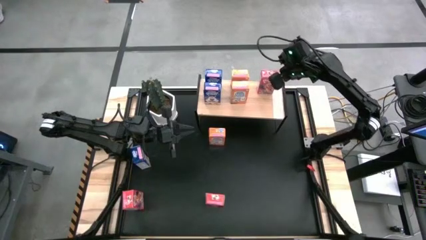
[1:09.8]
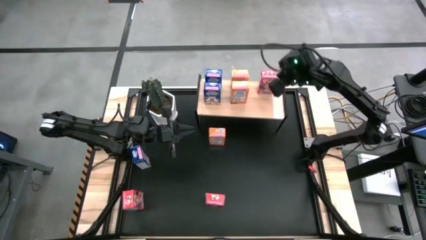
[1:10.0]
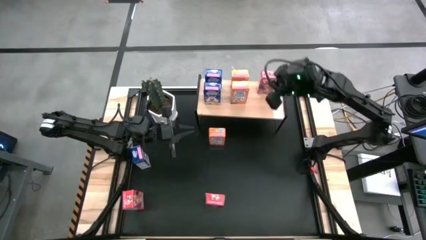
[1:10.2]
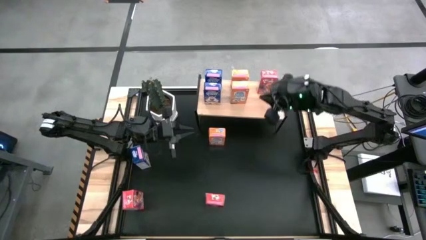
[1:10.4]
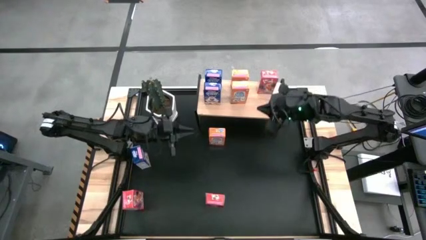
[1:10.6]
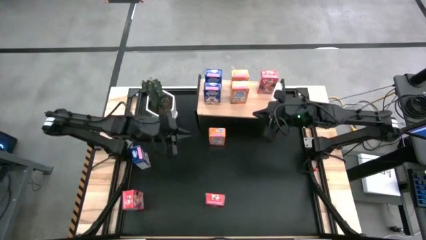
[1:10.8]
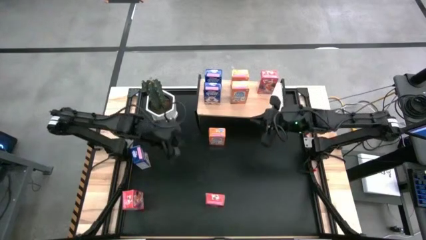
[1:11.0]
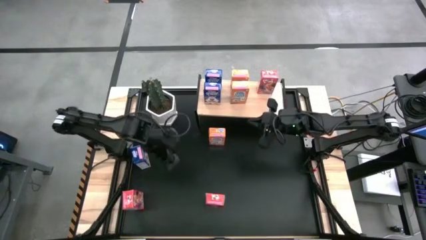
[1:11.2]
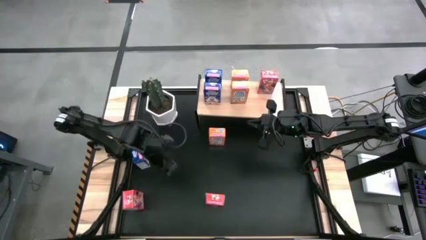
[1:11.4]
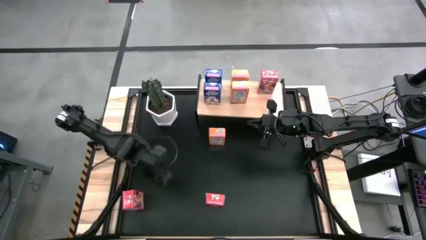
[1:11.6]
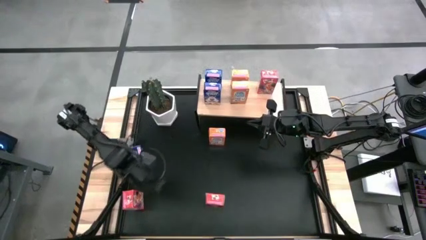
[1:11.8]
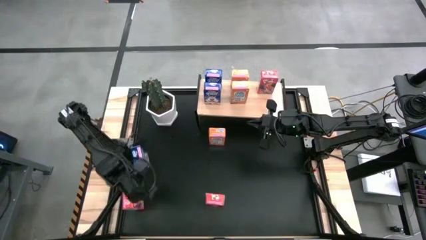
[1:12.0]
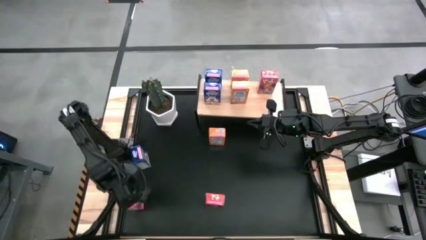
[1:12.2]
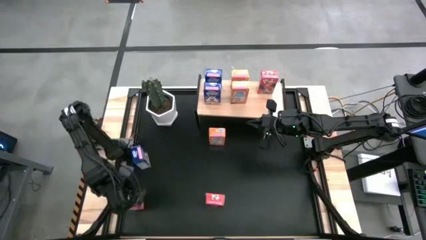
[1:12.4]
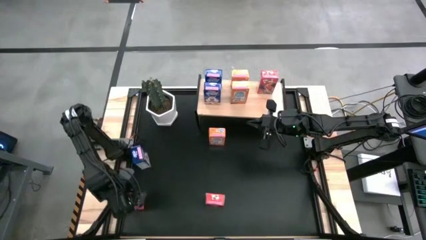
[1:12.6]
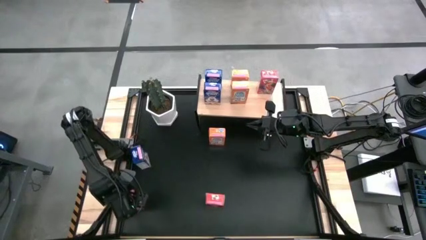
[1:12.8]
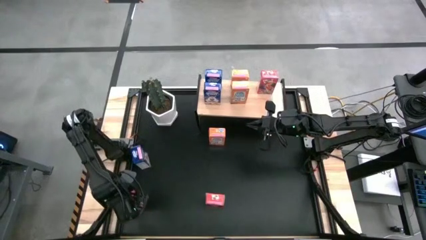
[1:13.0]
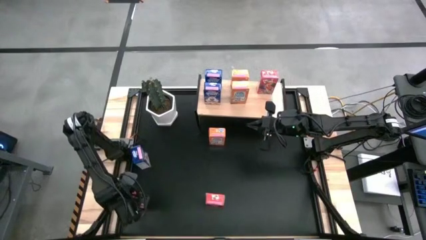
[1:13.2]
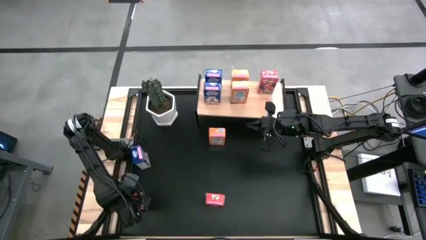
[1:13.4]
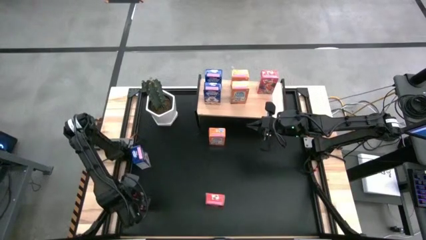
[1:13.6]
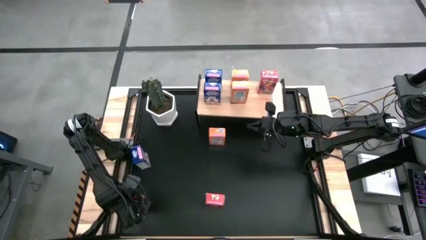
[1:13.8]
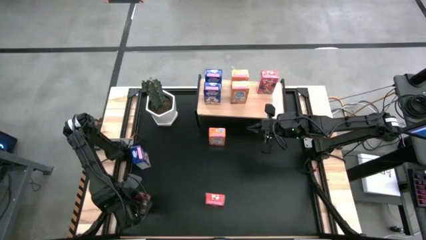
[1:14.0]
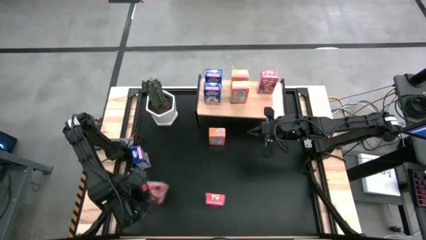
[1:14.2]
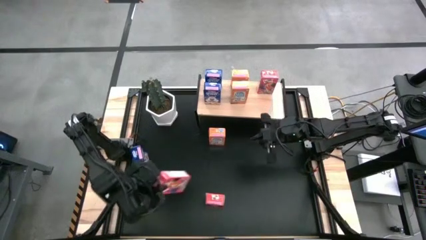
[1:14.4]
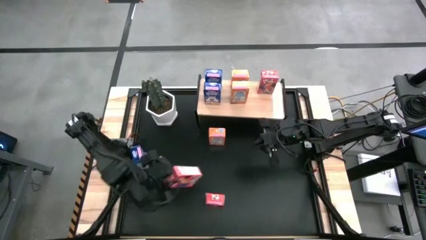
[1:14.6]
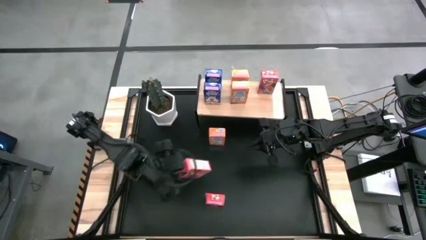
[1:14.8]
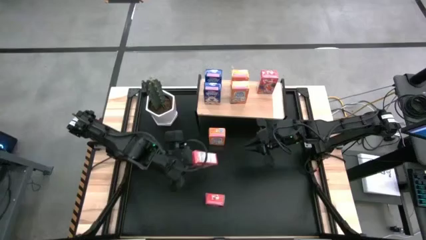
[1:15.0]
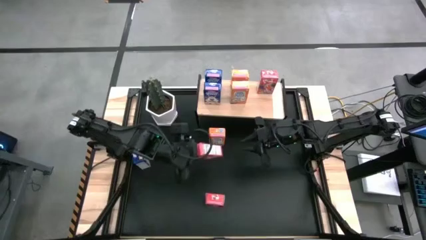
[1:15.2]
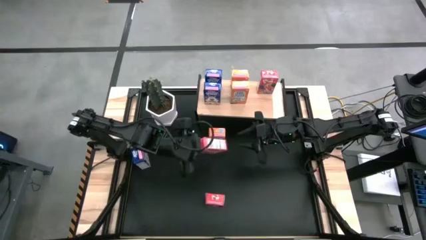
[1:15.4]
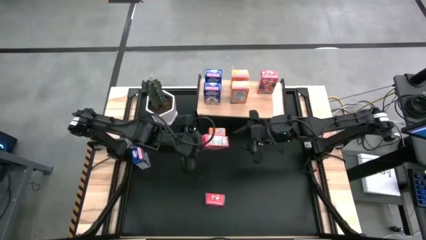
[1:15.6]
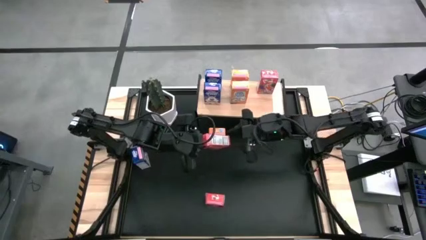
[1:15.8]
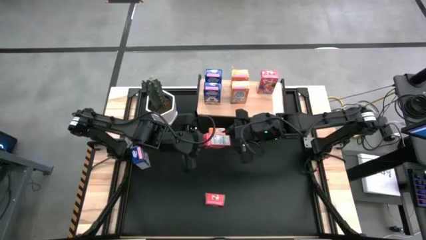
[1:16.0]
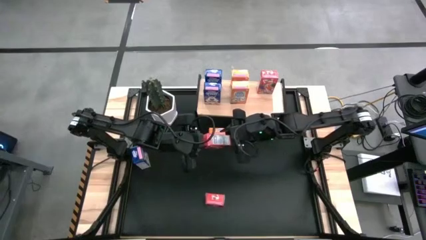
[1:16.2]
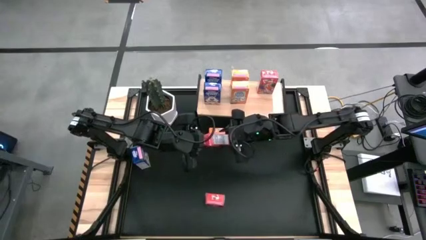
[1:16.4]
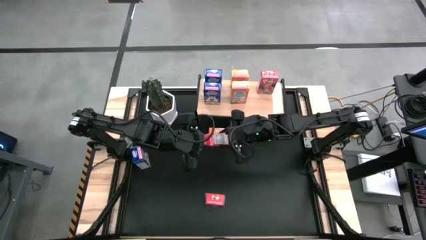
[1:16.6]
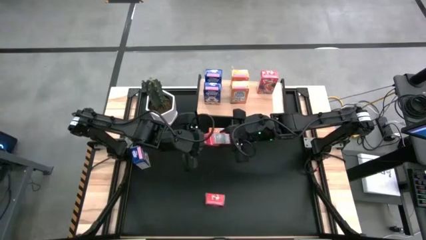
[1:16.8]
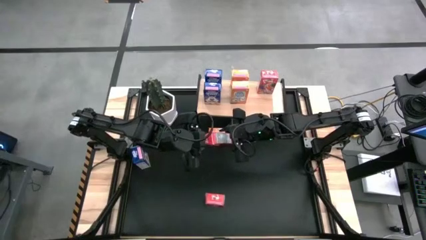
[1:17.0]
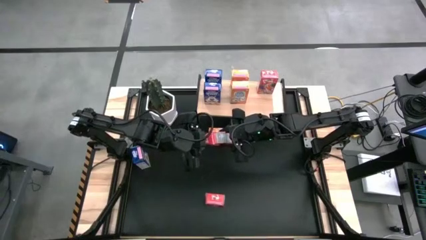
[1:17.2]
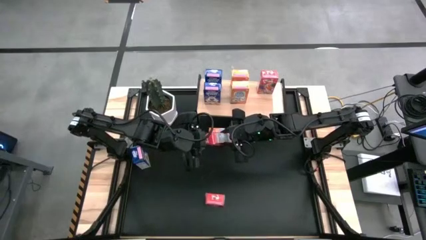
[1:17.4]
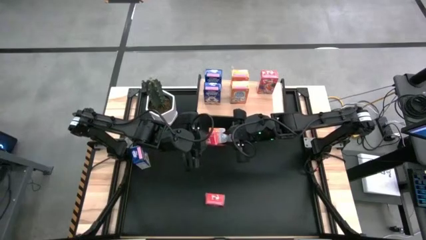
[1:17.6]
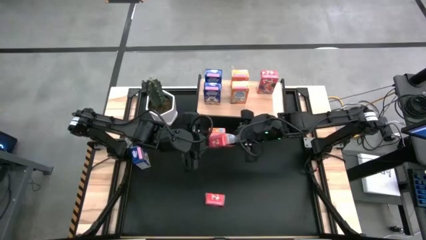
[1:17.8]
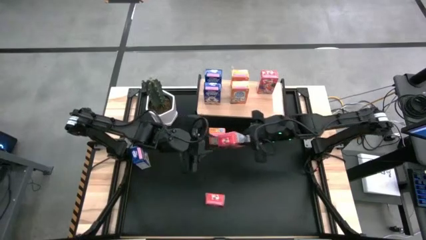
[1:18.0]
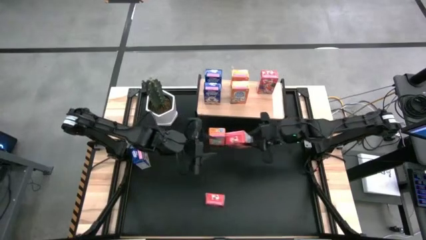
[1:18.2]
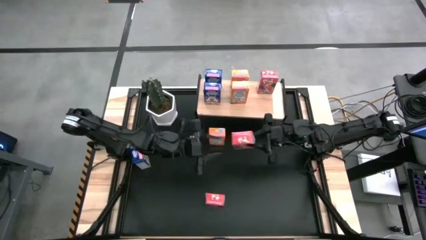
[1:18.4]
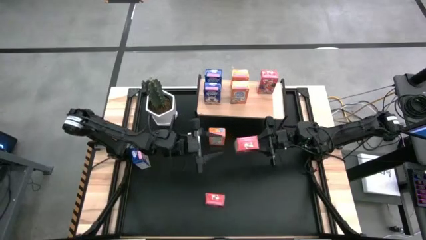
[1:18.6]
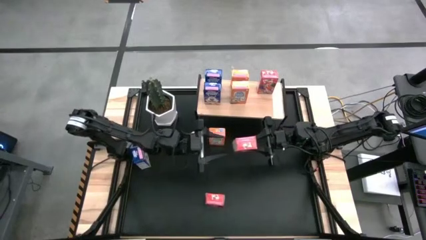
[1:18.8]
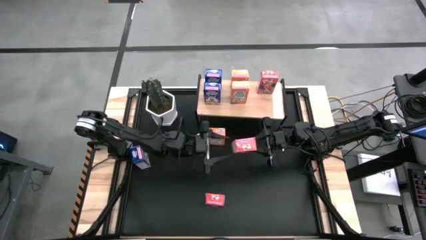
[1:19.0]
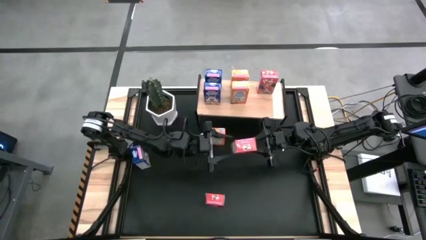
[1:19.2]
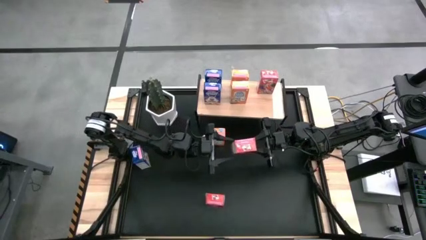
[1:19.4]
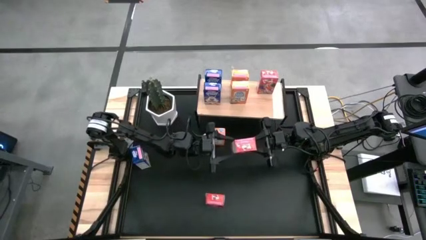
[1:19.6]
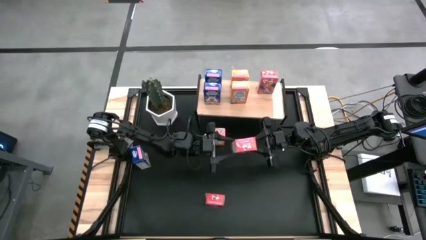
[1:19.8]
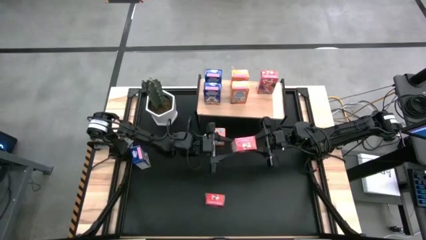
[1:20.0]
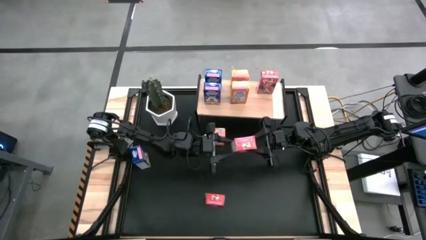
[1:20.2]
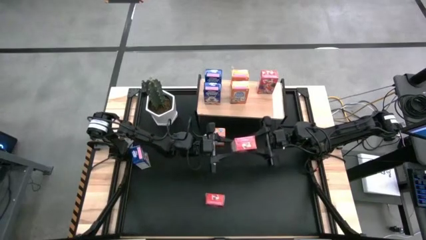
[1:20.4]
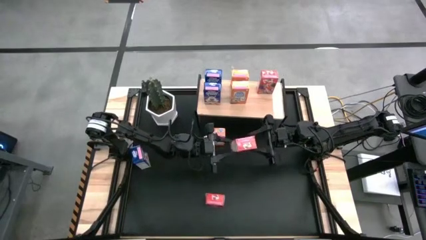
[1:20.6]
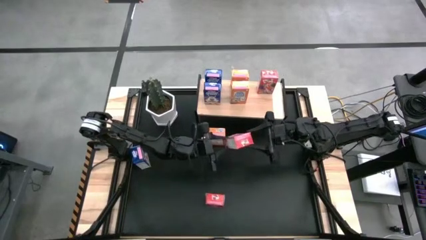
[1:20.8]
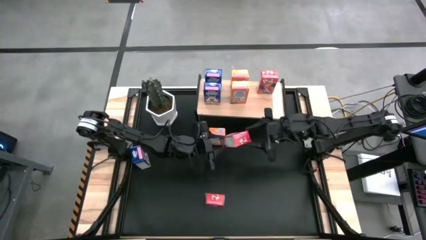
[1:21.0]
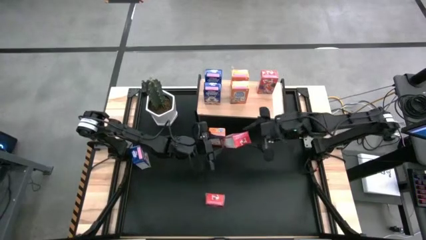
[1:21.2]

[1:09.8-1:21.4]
Task: Stack cereal on shelf
Put the left red cereal box on the shelf

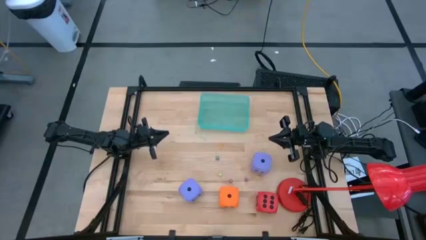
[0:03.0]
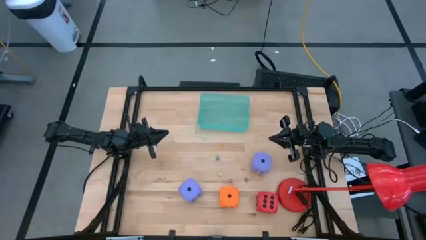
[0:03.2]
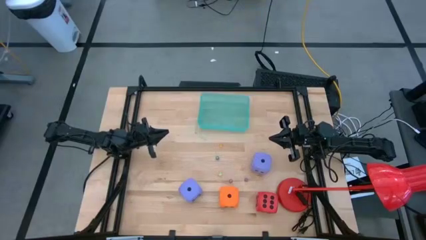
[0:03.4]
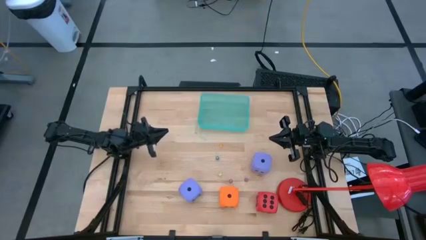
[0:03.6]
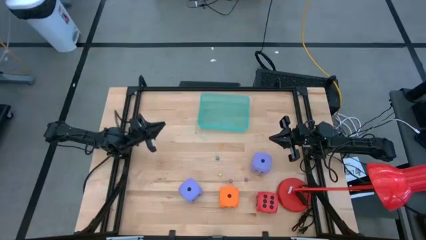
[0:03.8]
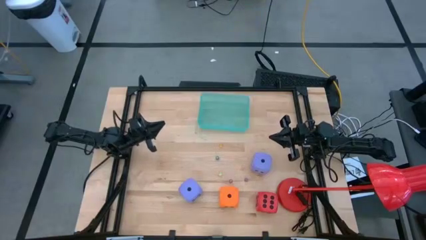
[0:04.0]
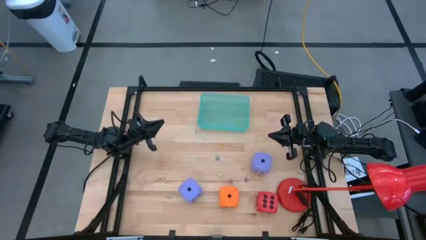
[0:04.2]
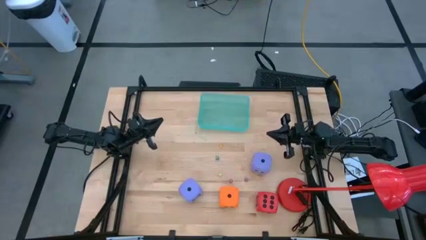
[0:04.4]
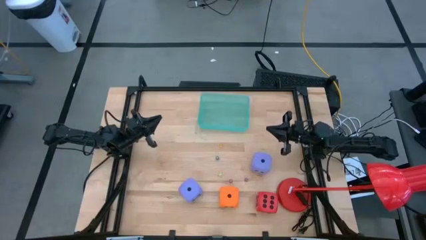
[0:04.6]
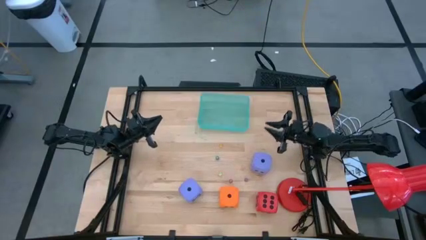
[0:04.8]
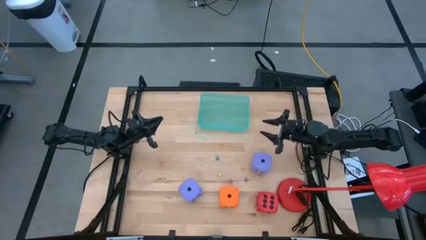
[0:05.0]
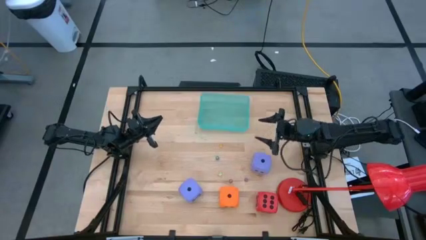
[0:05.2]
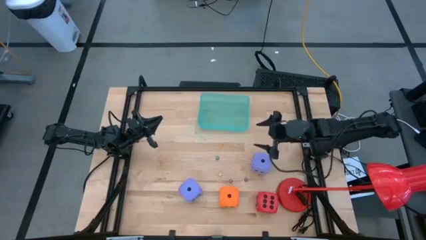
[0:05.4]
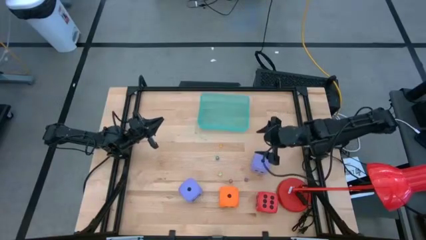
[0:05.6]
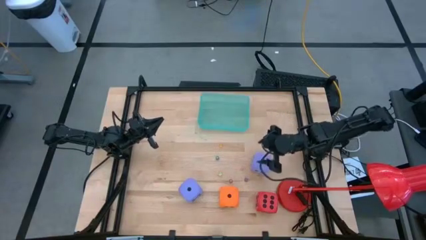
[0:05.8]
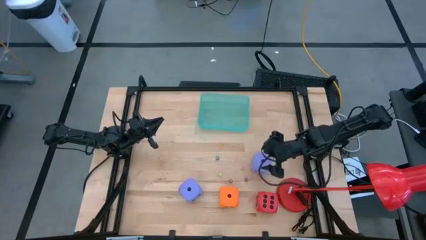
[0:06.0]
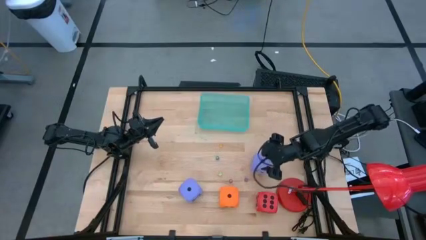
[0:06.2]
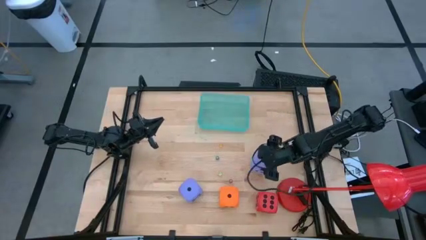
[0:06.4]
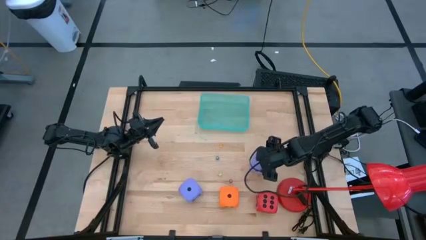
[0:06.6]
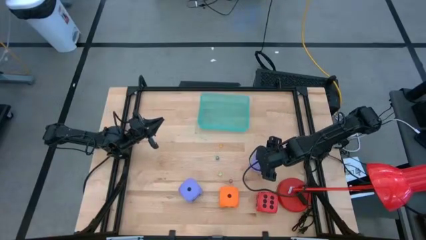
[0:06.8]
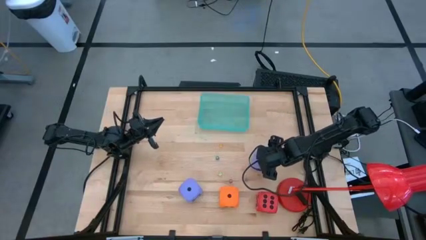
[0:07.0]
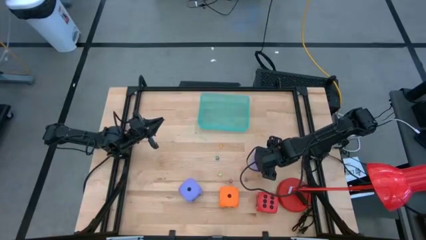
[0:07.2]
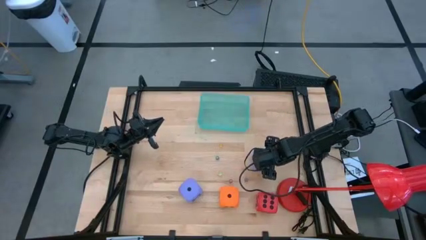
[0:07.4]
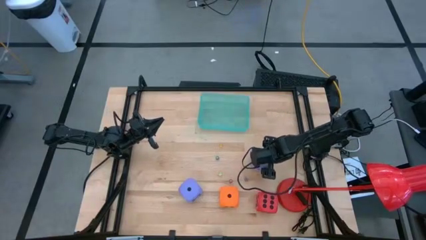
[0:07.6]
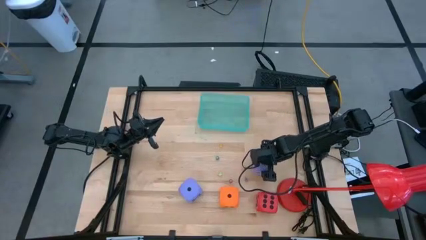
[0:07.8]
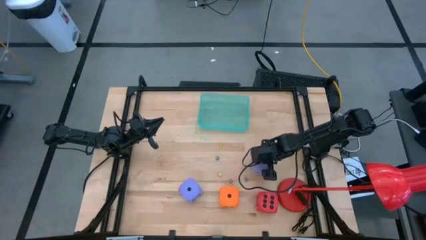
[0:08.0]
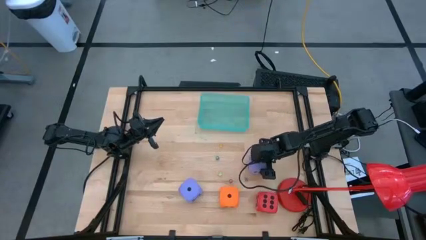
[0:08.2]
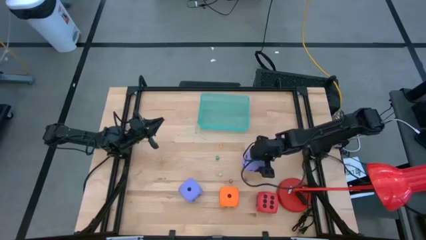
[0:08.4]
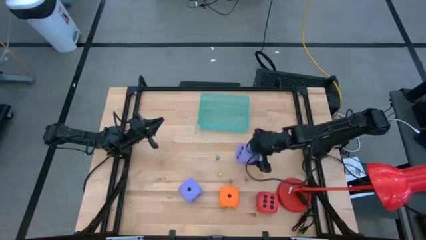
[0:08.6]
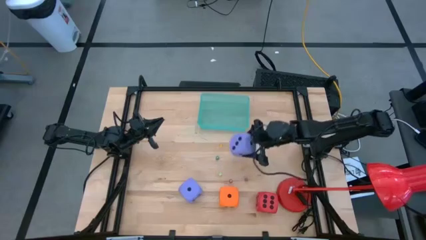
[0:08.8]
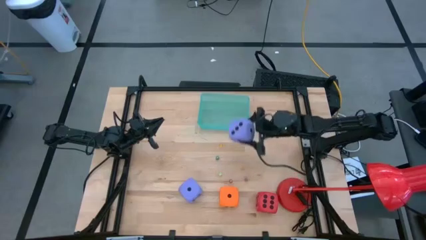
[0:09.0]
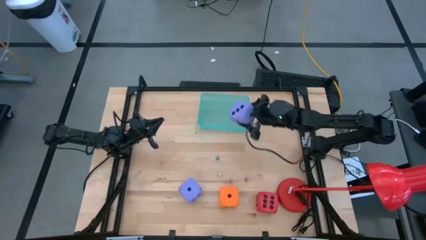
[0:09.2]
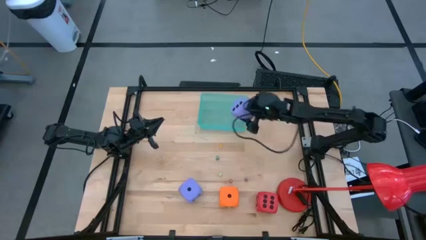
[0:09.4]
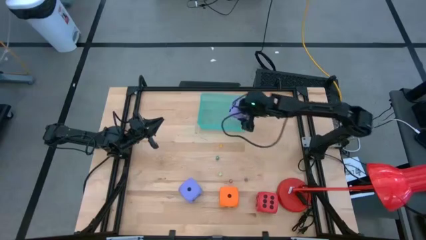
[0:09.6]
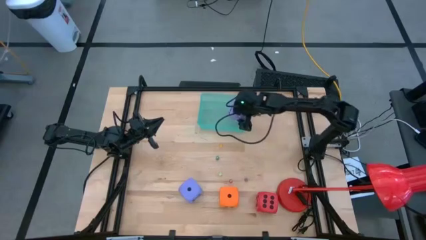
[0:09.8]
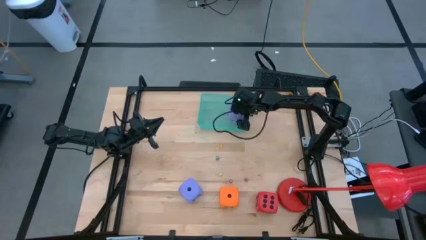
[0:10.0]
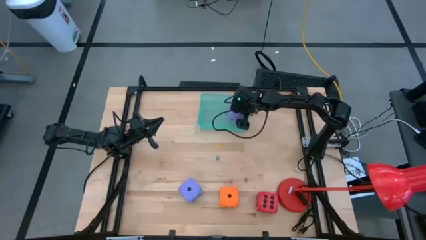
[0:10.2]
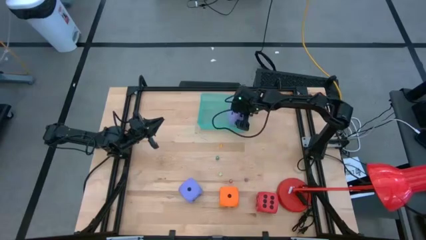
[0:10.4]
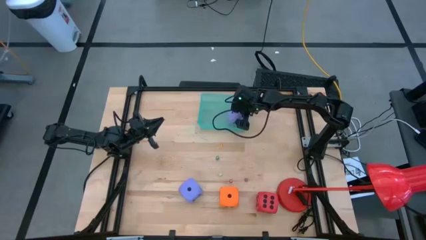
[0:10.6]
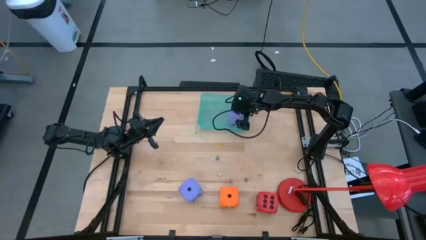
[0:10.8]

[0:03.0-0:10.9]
Task: Pick & Place Dice
Put the large purple dice into the blue transparent bin
